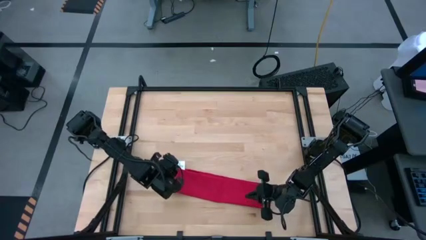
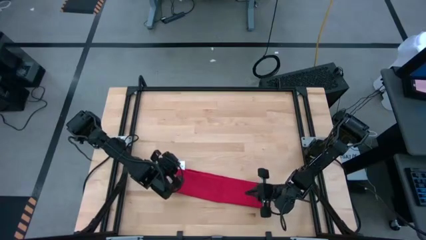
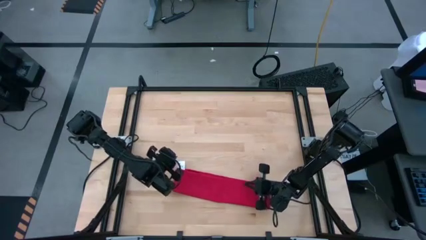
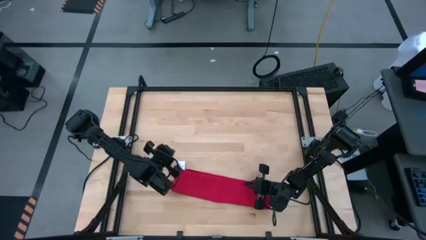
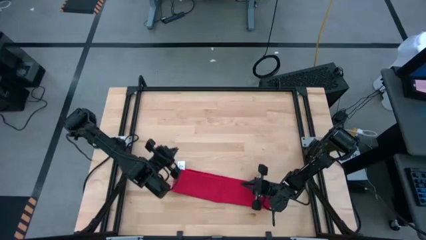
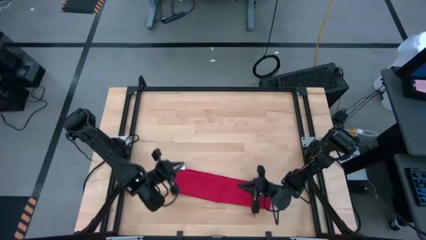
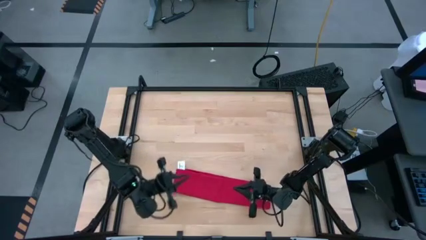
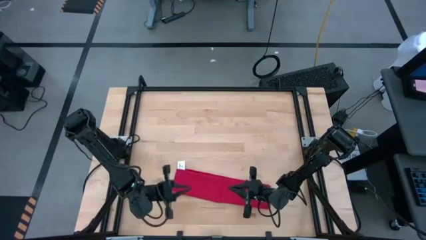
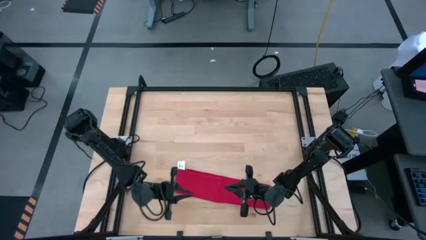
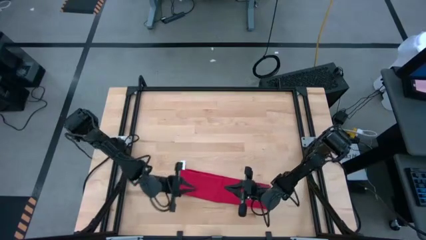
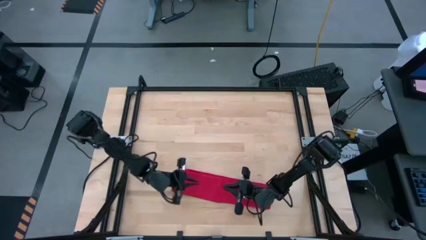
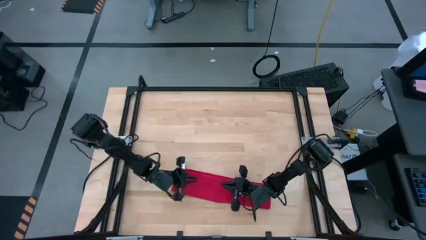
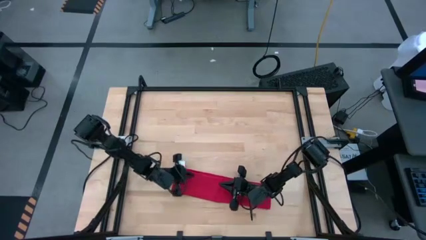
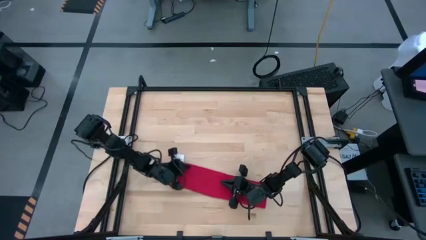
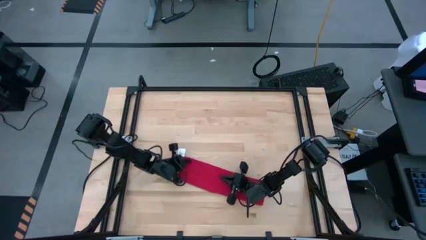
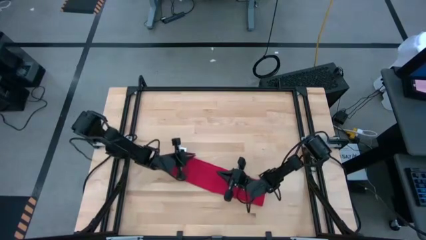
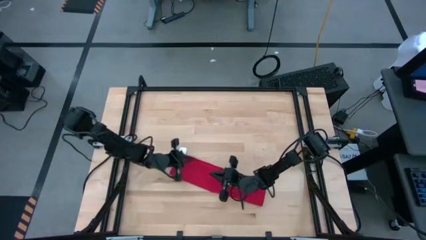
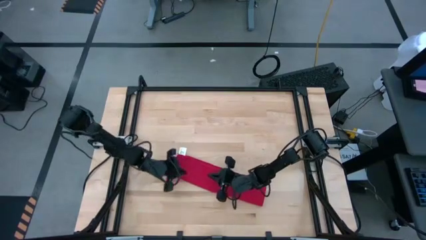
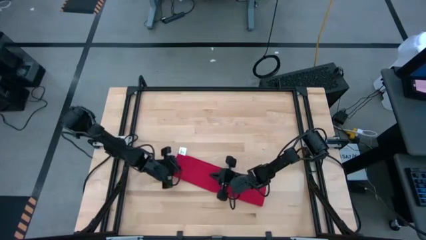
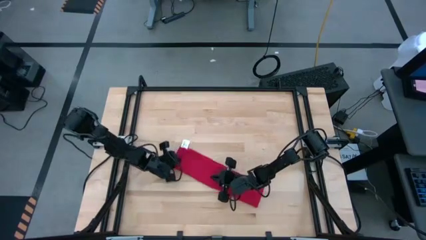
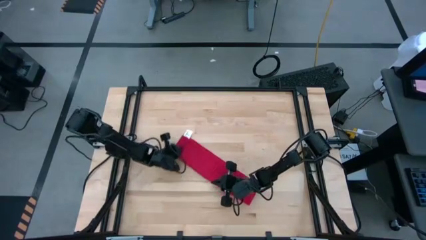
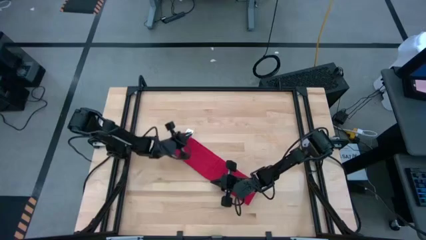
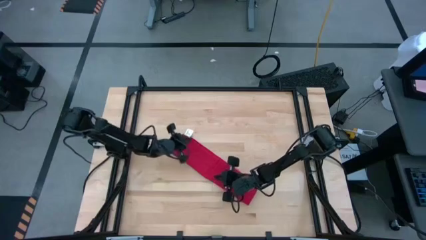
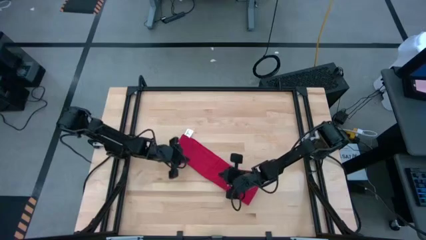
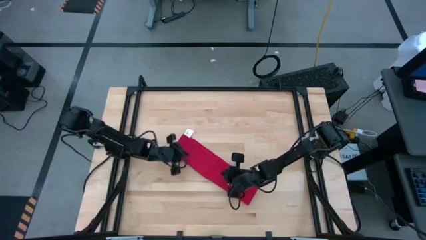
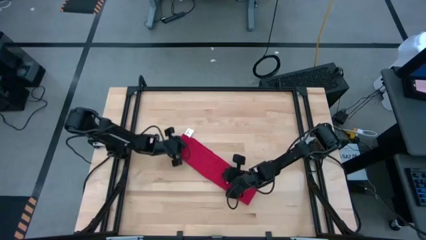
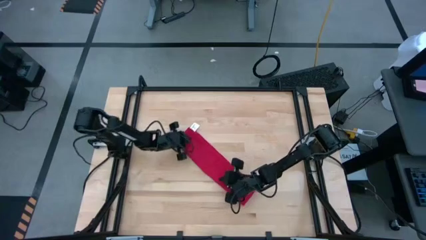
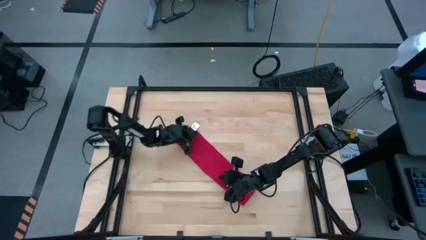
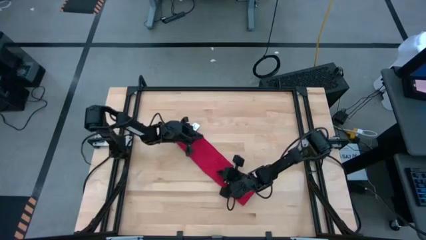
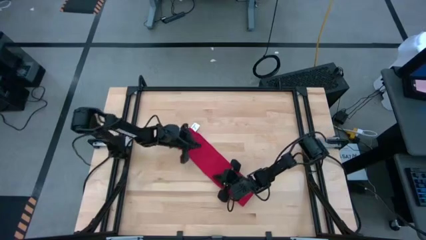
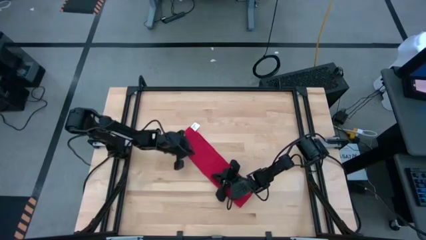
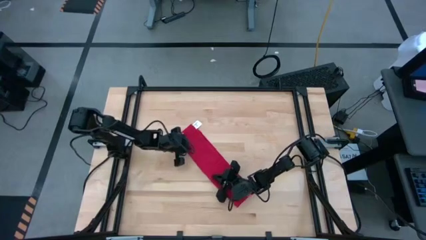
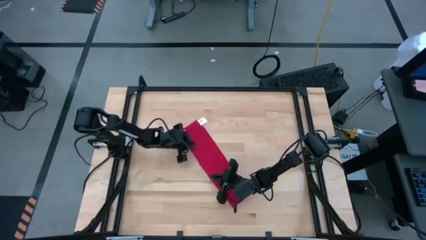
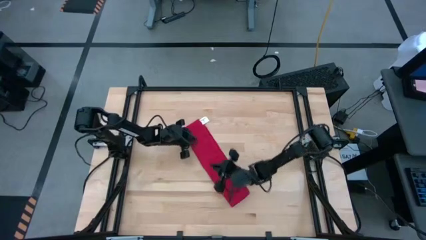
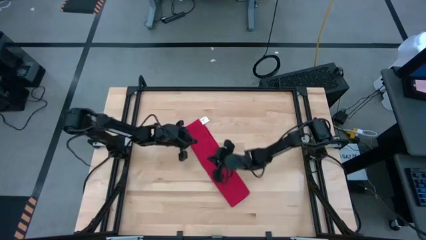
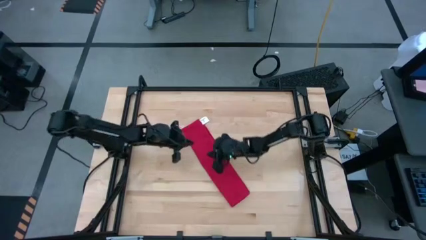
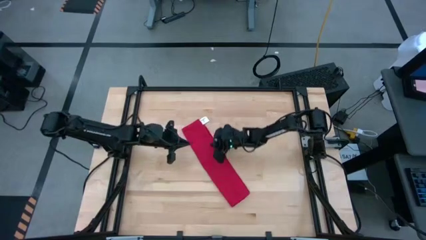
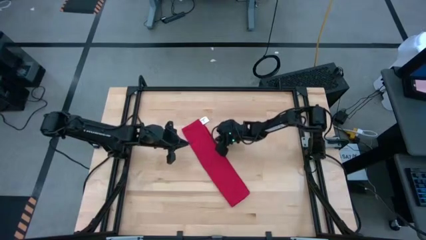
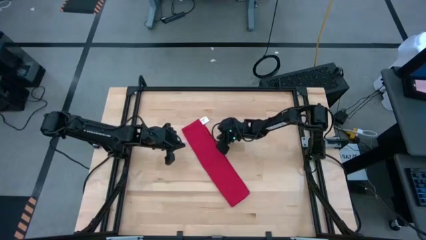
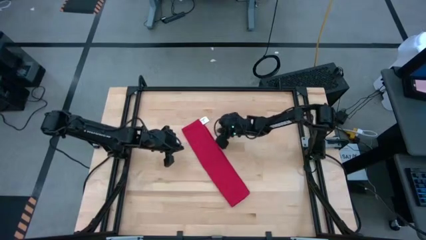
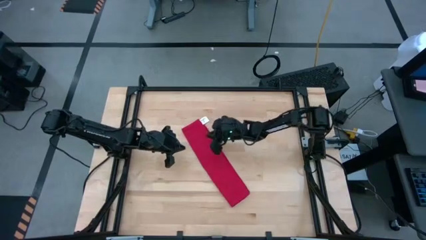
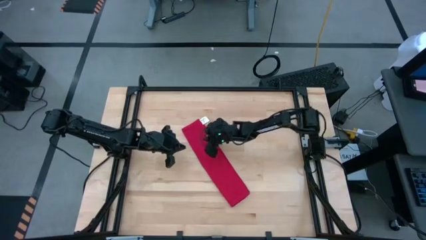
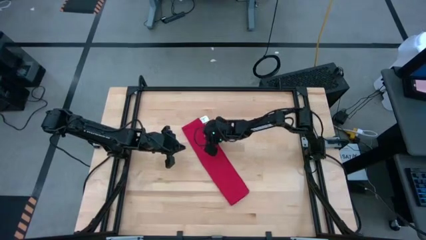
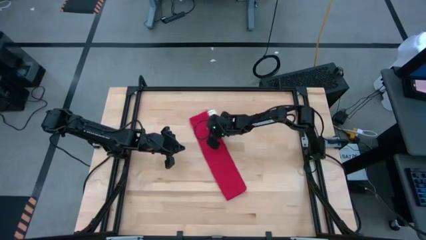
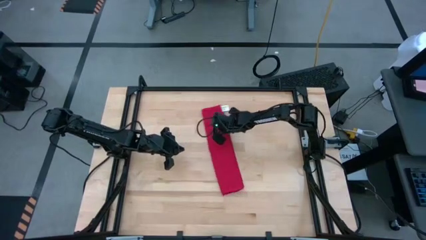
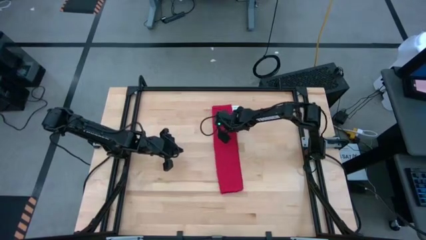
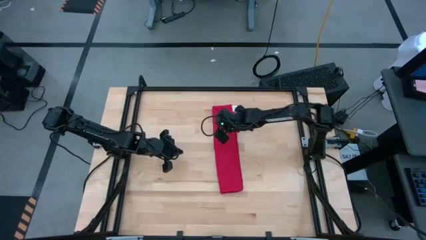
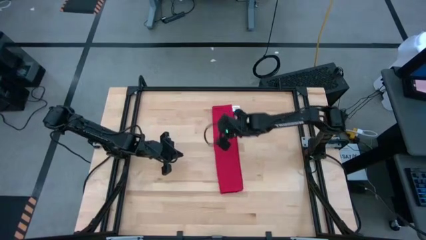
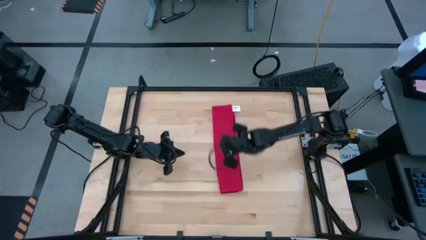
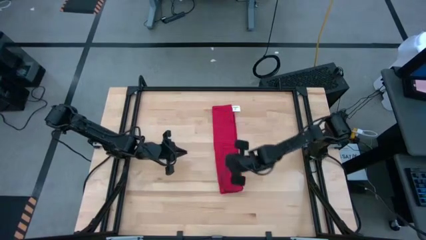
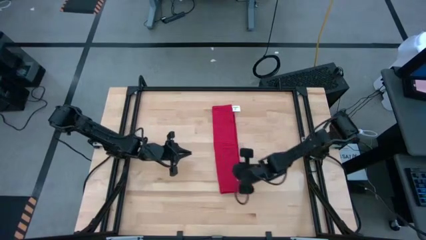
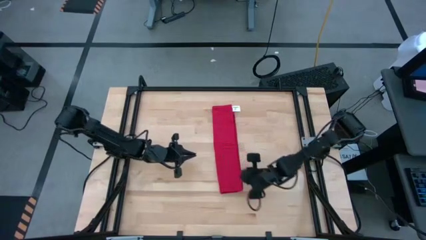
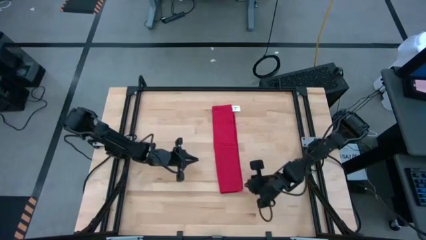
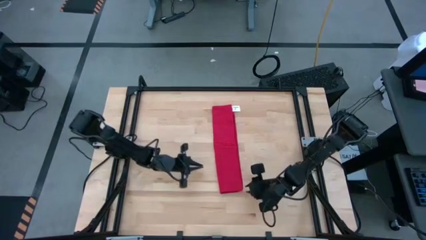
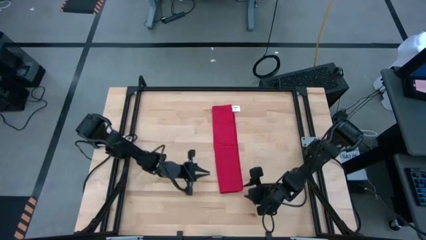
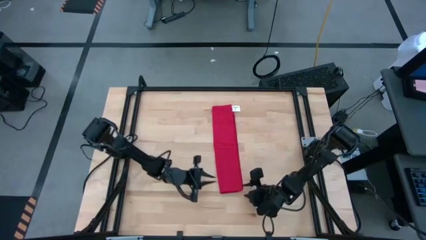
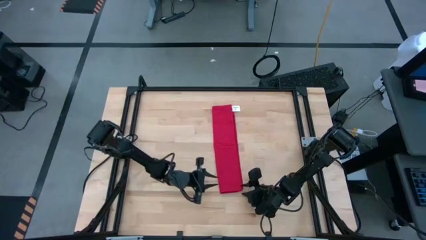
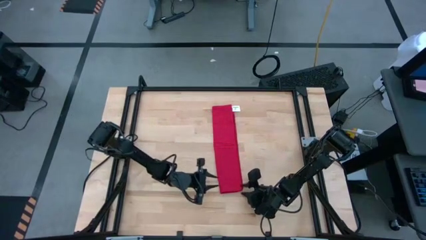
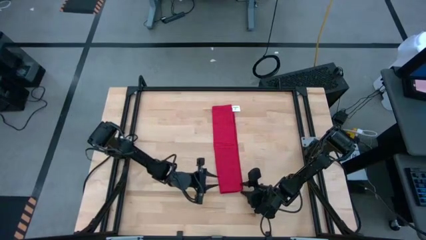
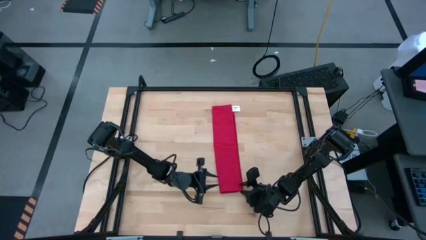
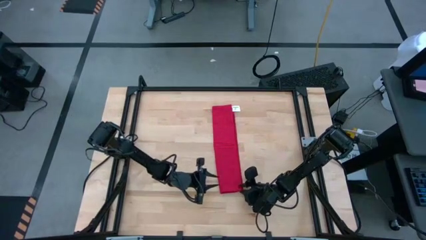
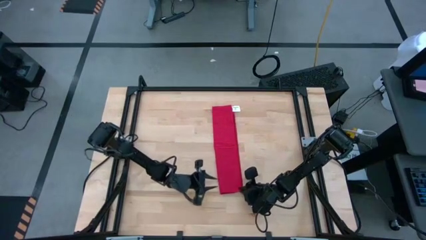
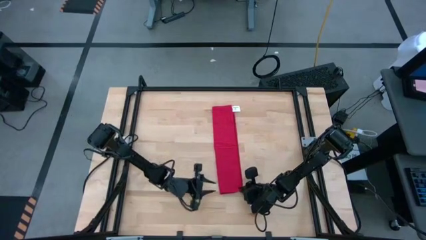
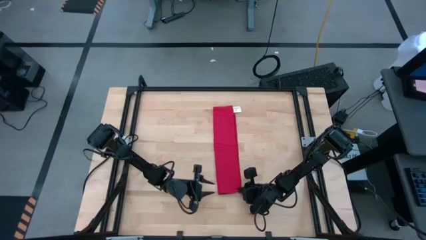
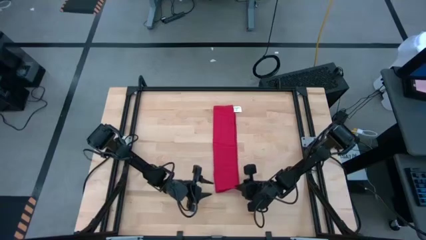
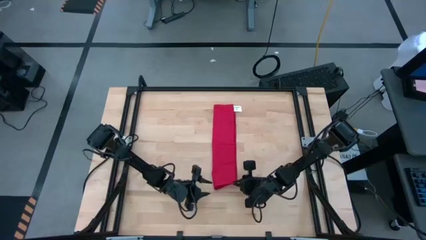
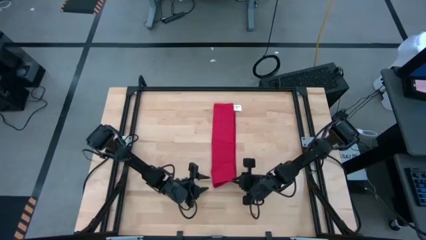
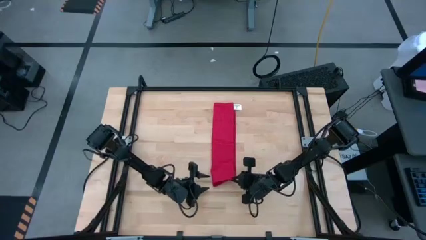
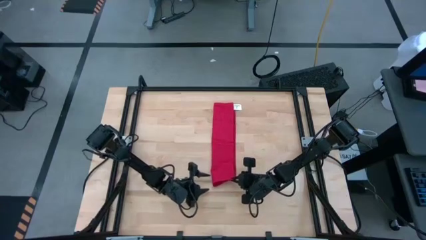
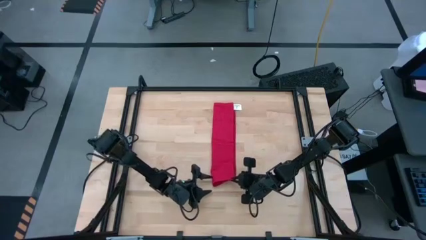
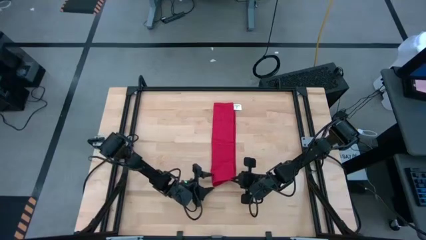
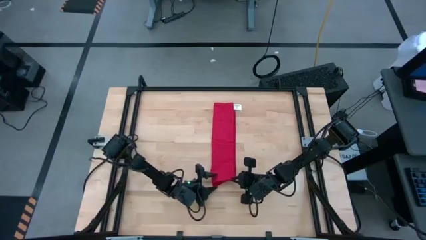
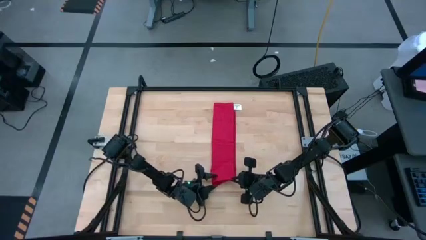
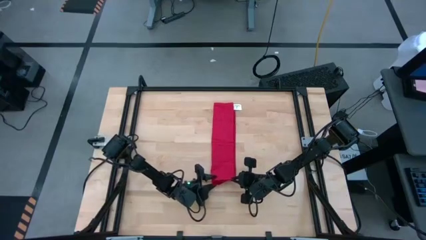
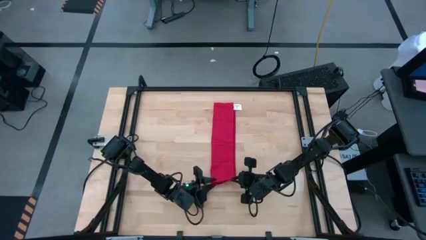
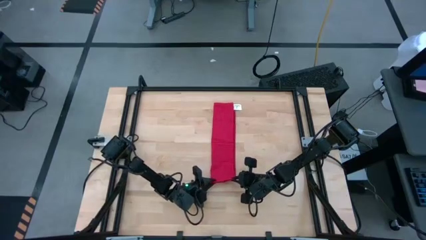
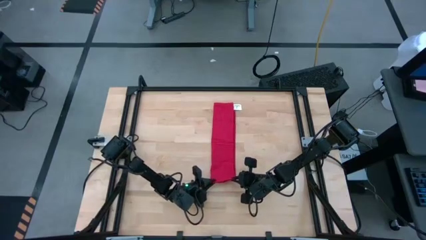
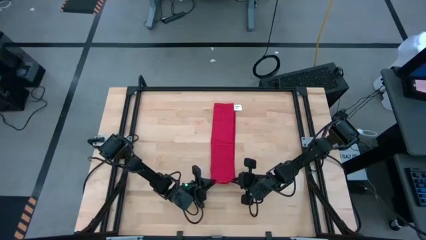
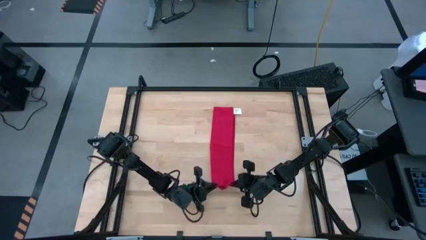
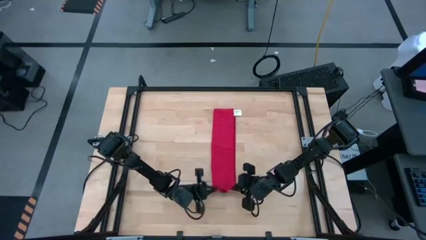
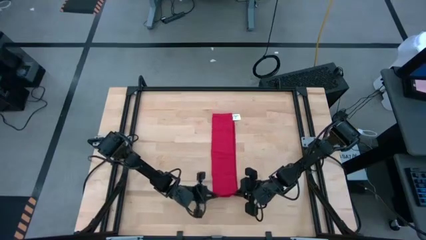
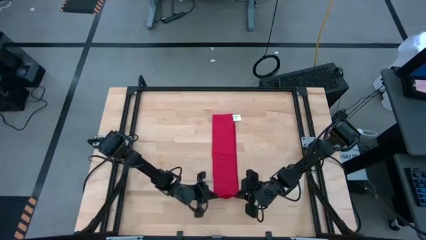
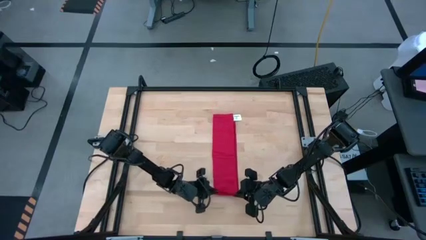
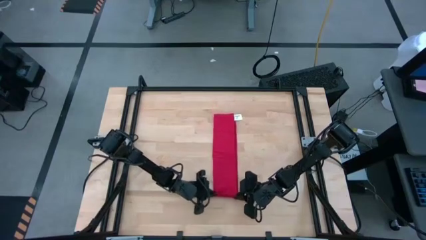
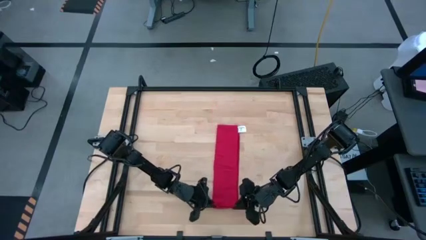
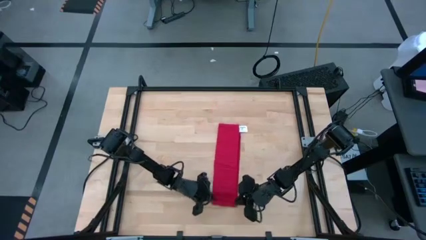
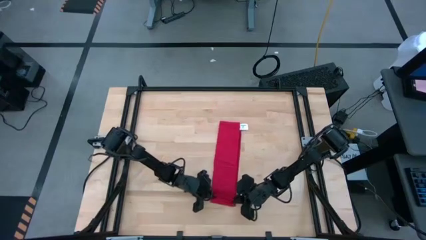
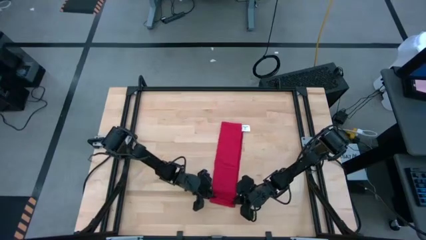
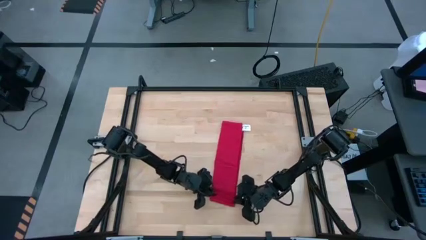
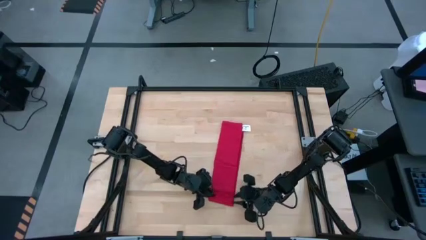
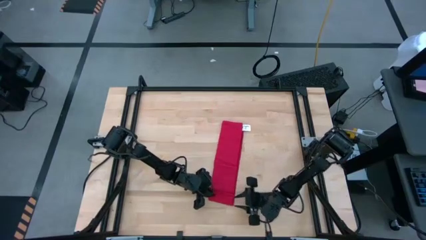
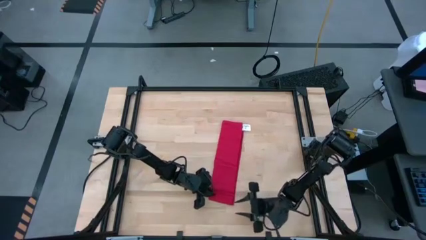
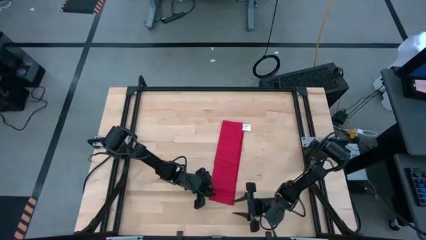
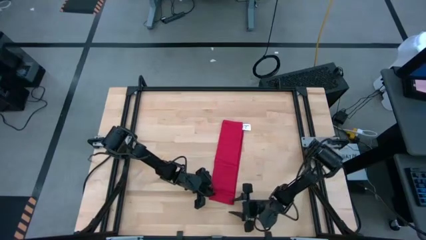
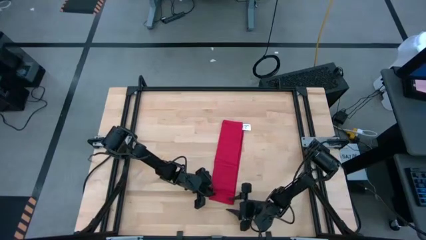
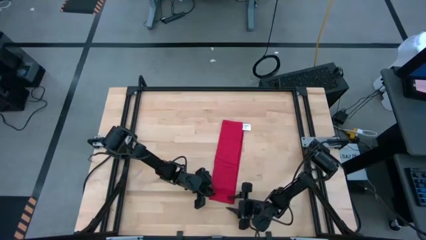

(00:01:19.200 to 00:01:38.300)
Task: Roll towel
Roll the red towel
